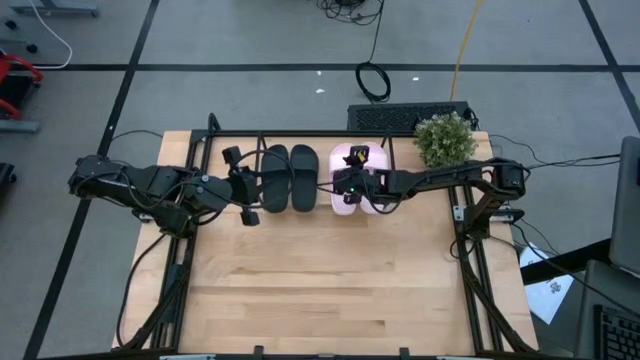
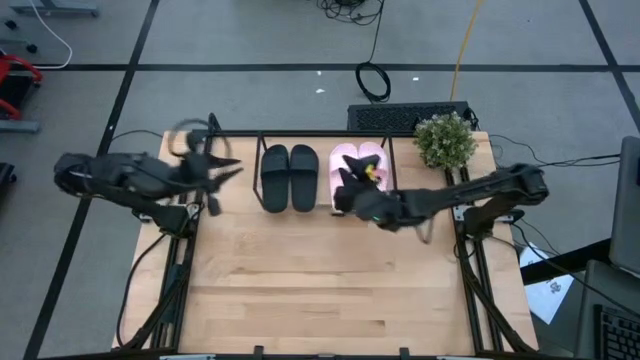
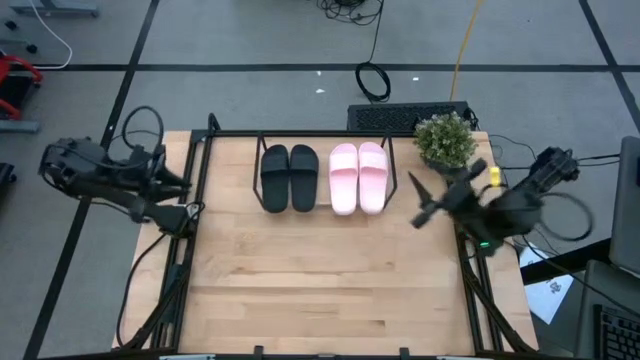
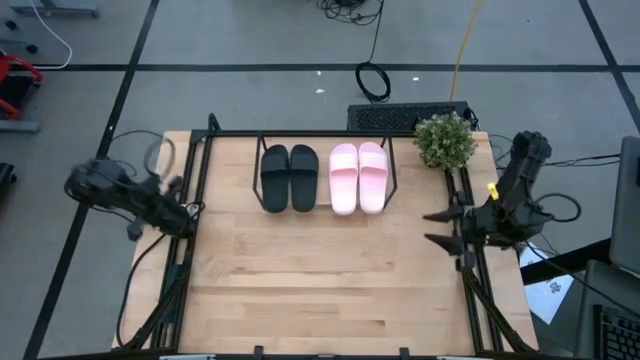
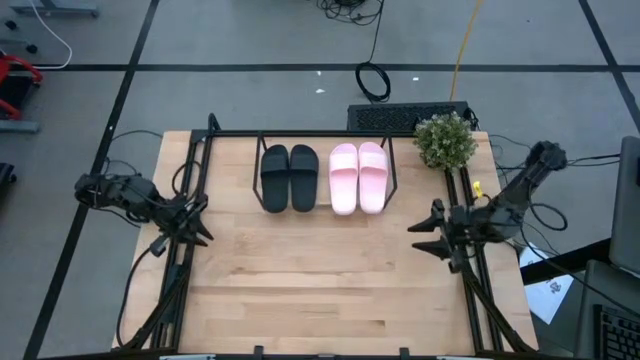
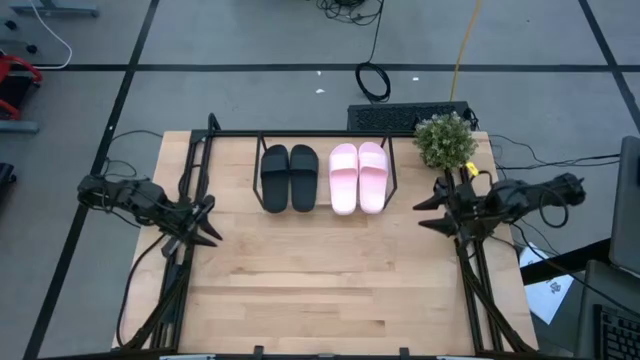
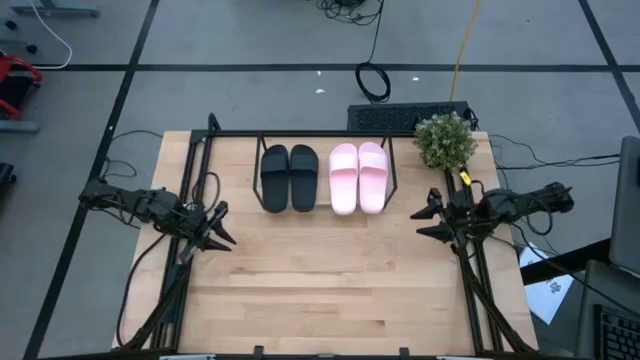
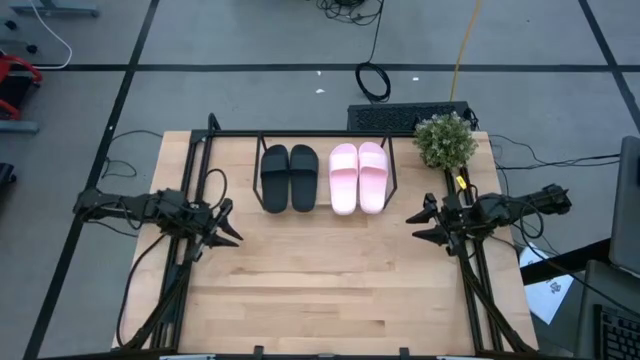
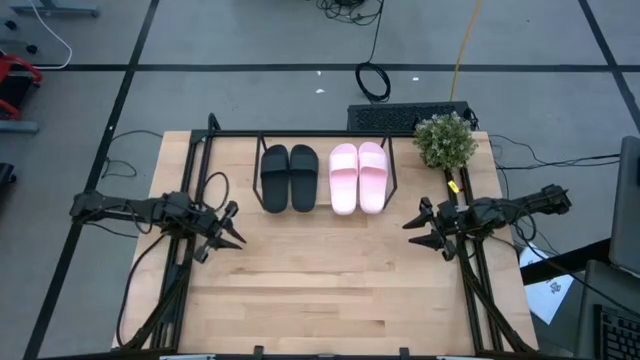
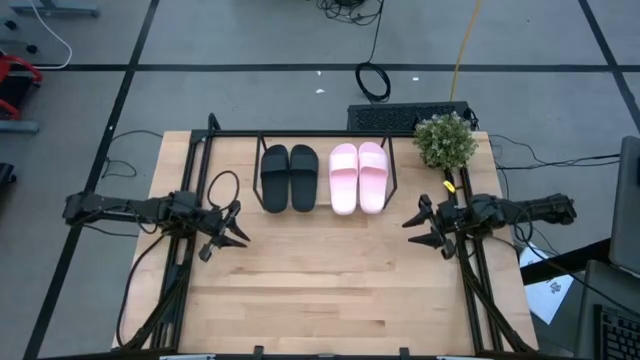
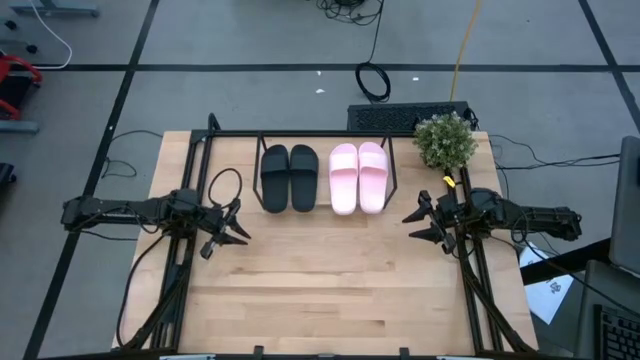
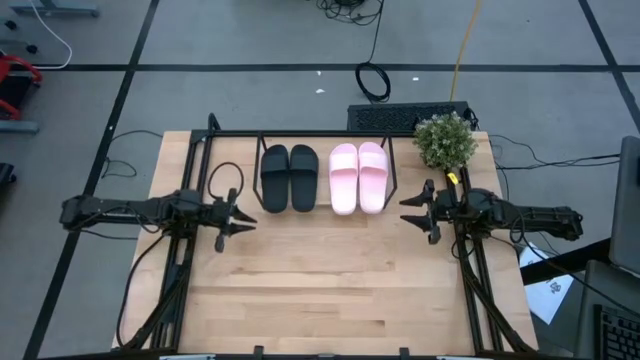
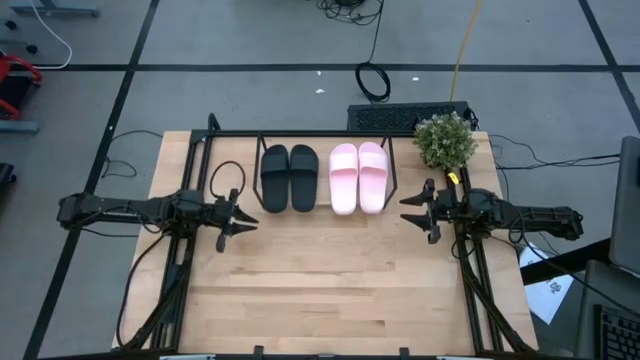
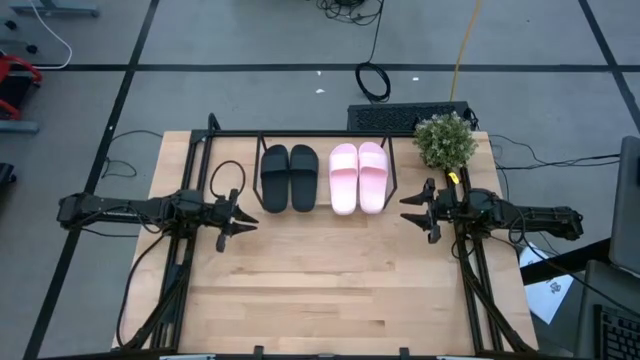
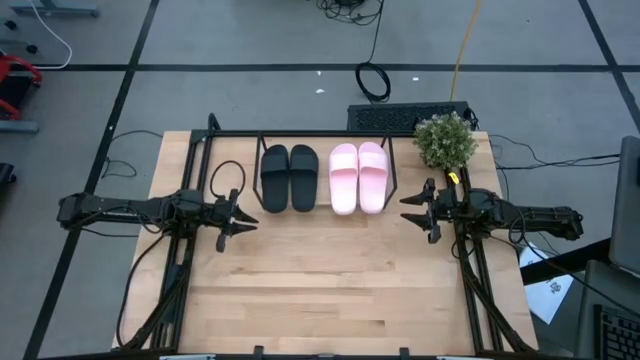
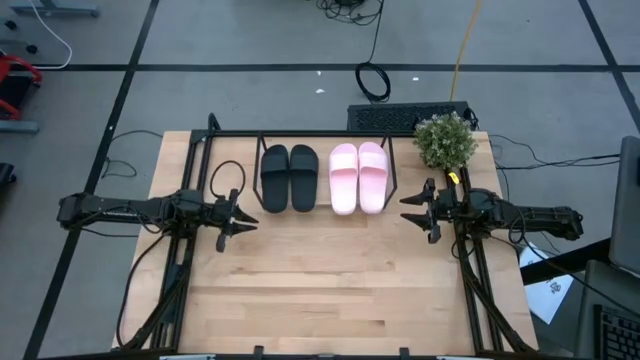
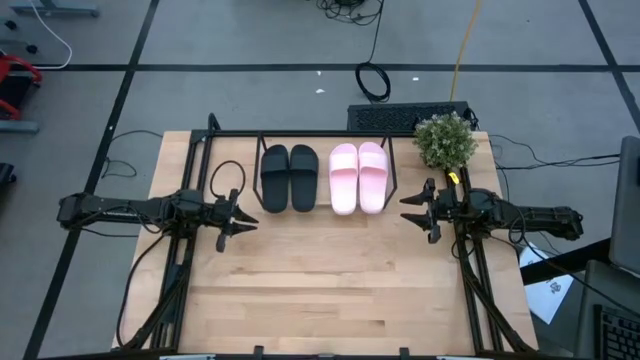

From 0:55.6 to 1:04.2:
Task: Pick and place slides into the shelf
Return to Home Position

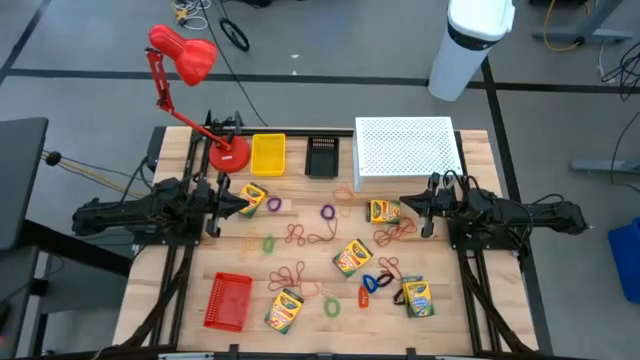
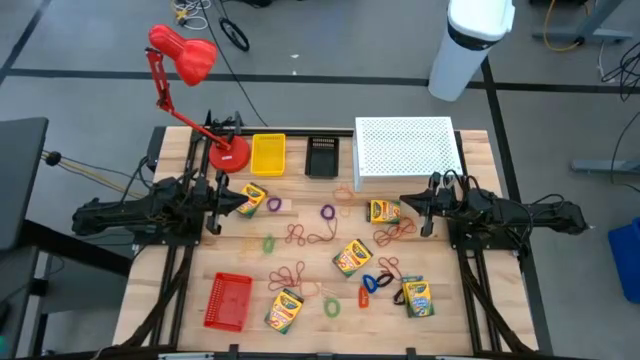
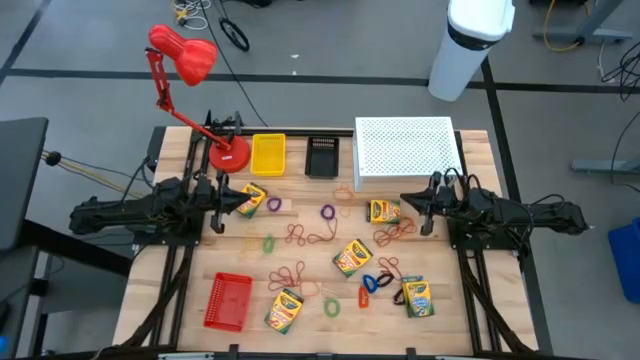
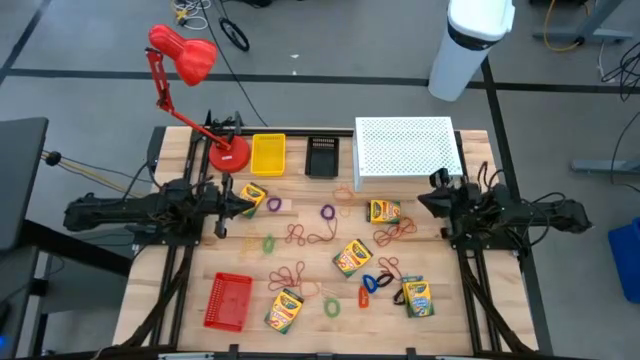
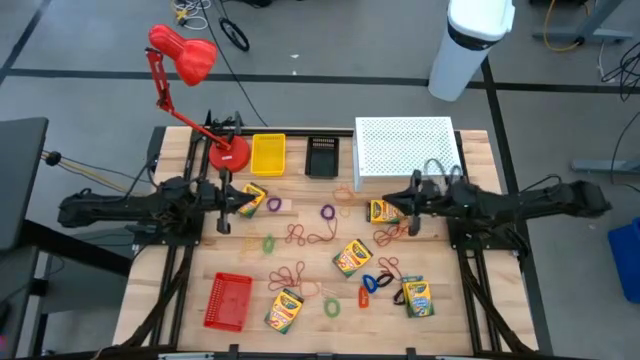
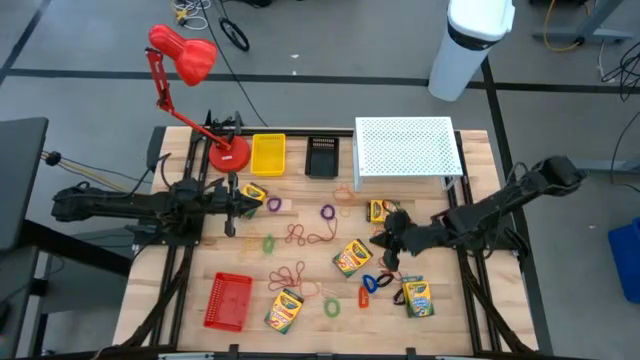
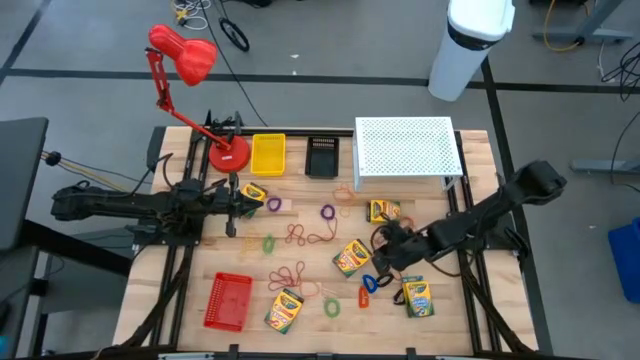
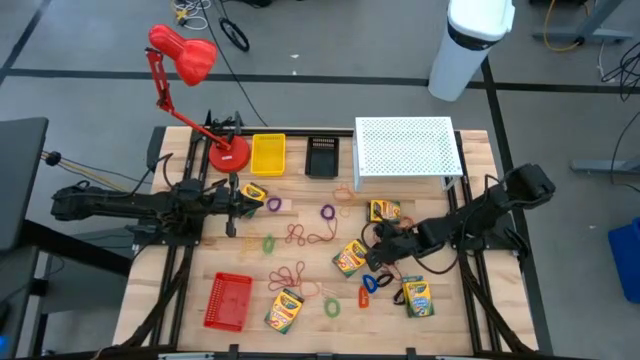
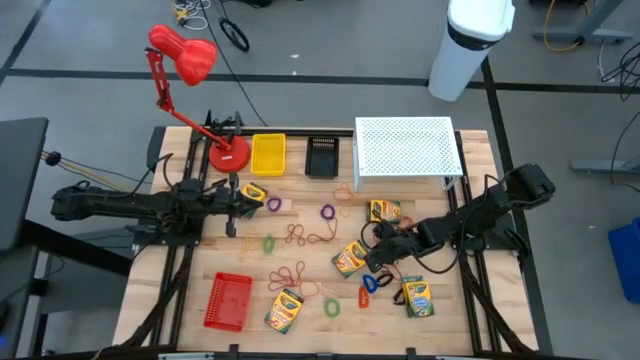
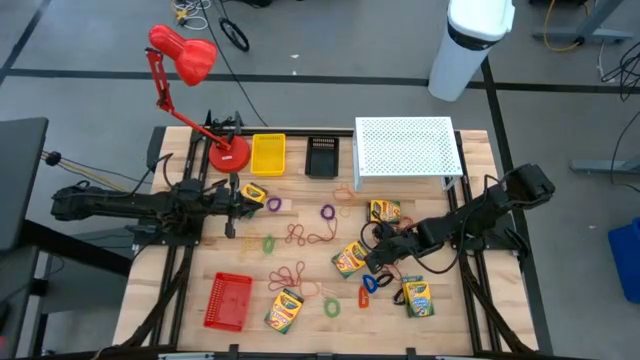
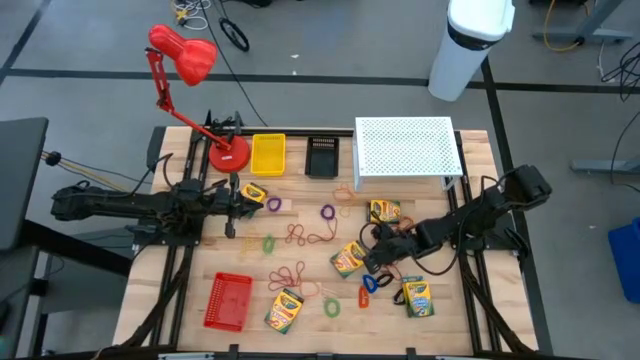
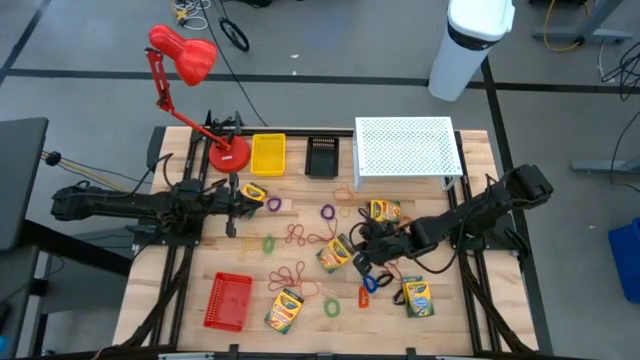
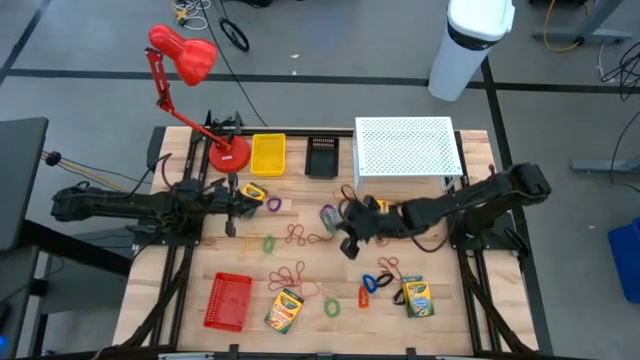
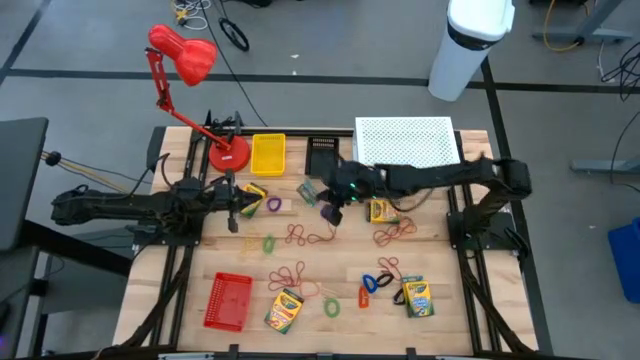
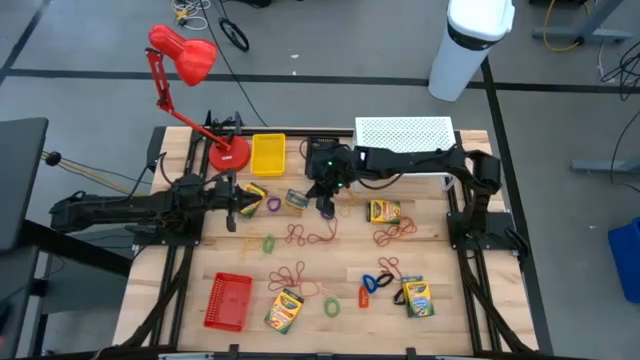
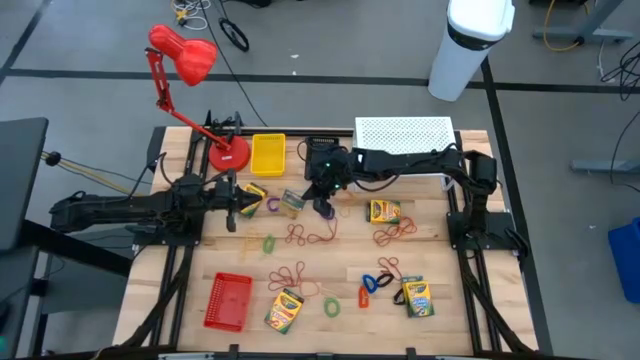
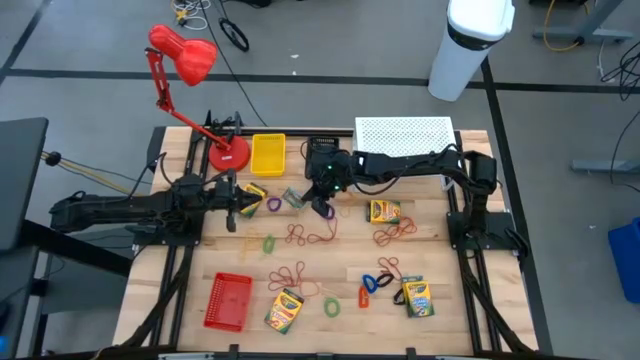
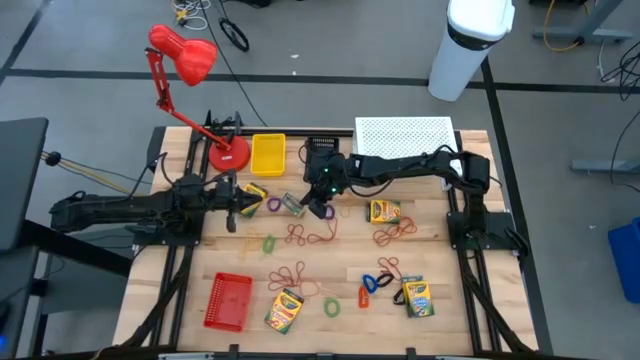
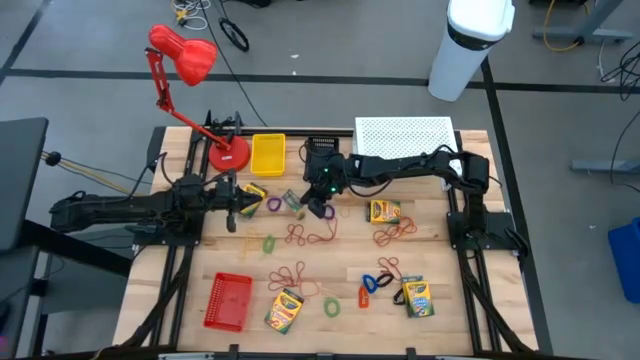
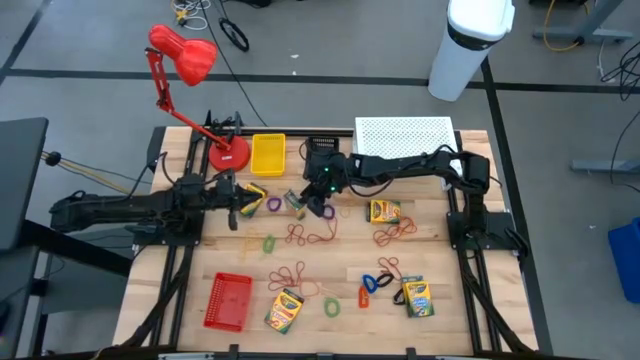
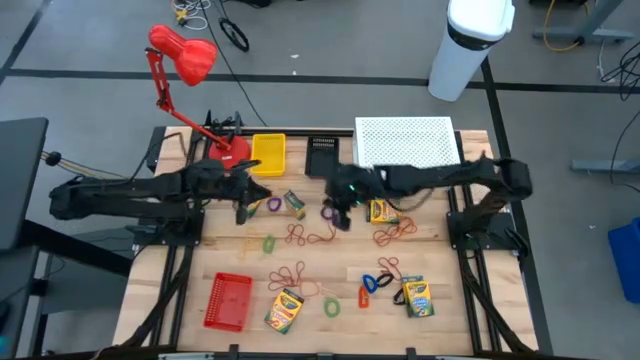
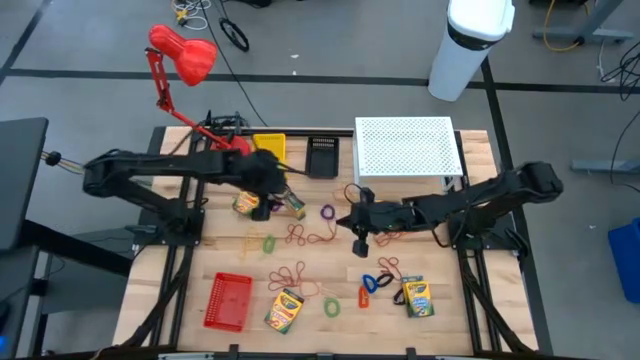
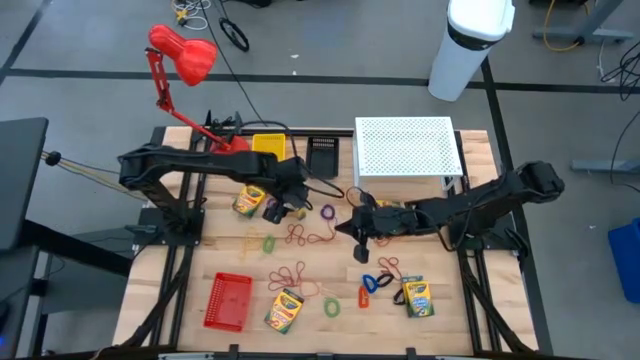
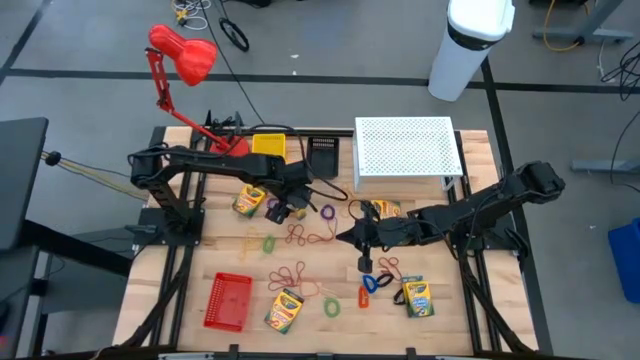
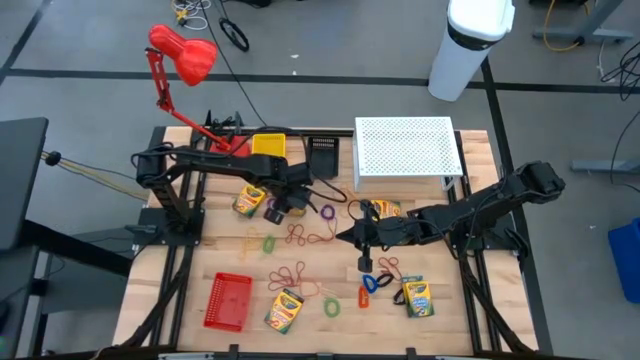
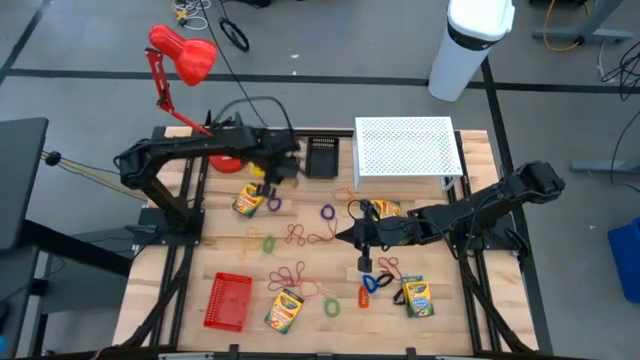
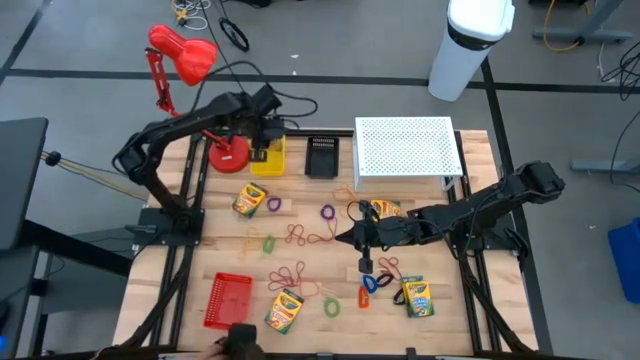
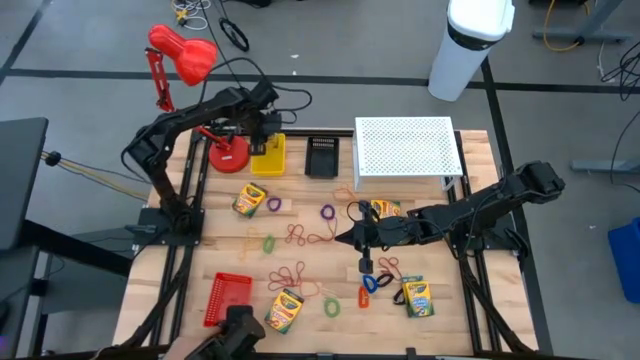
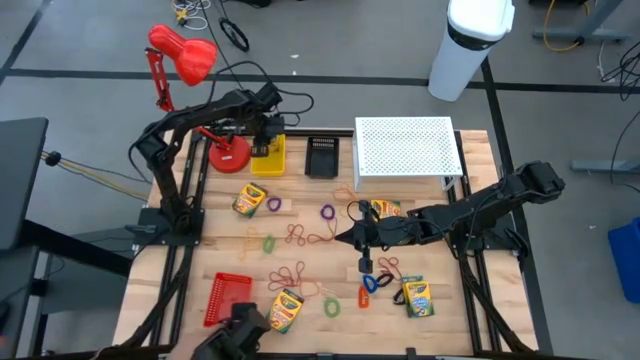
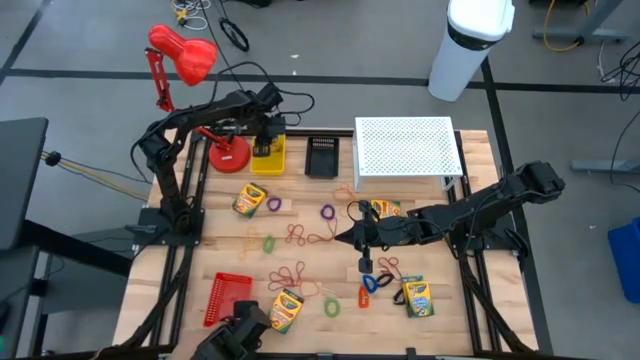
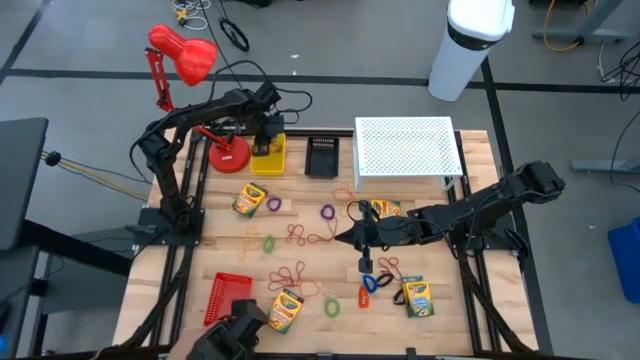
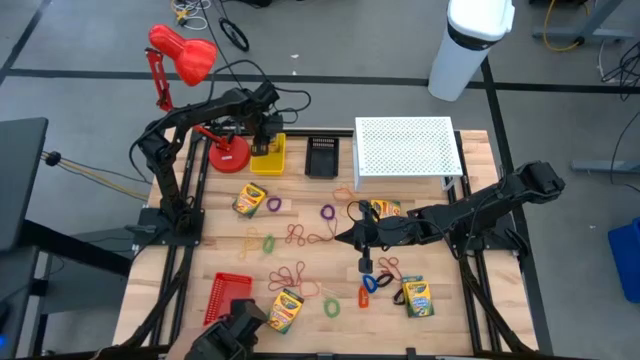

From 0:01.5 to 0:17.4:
Task: Pick & Place Office Desk Supplies
Put the middle yellow crayon box into the yellow bin
